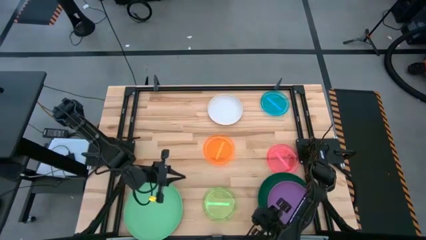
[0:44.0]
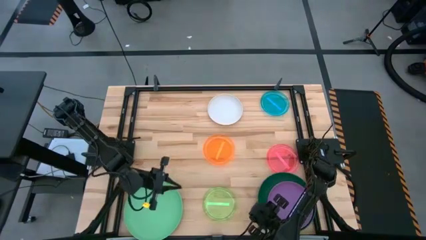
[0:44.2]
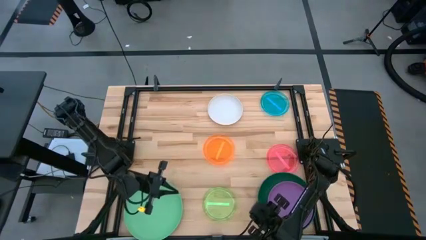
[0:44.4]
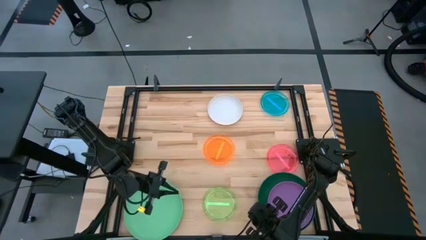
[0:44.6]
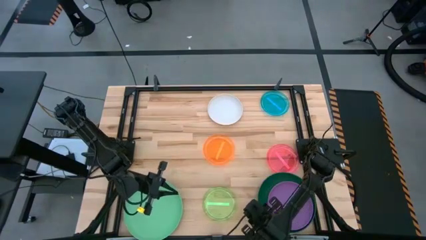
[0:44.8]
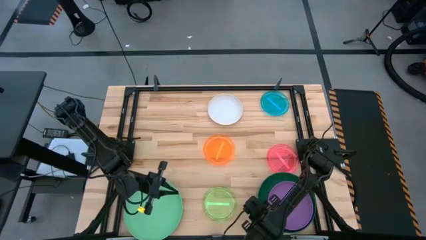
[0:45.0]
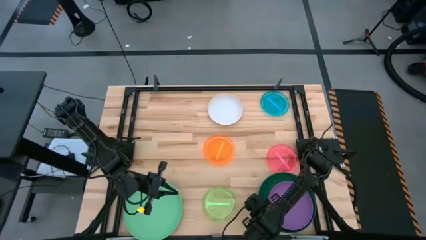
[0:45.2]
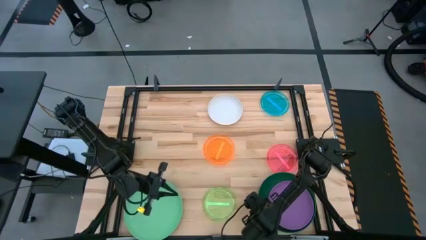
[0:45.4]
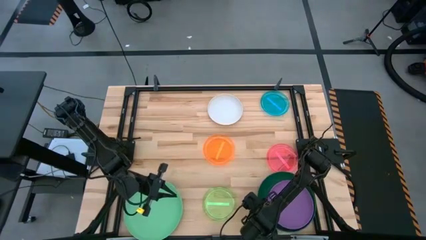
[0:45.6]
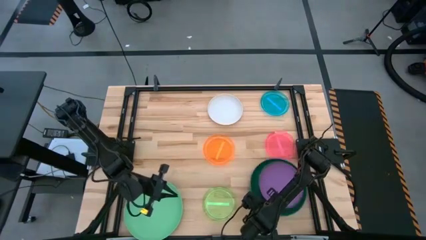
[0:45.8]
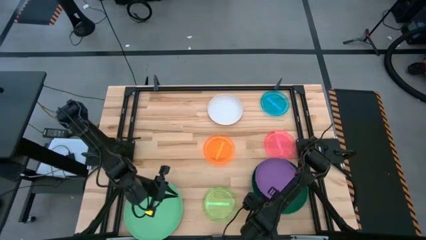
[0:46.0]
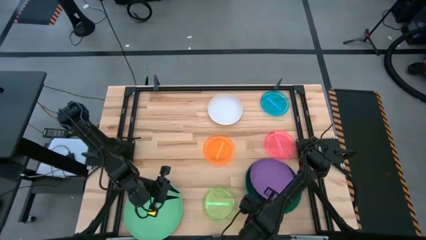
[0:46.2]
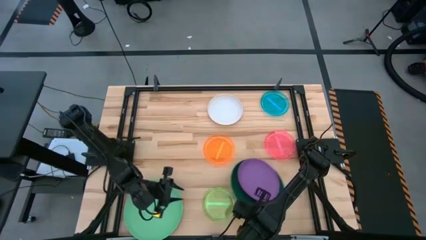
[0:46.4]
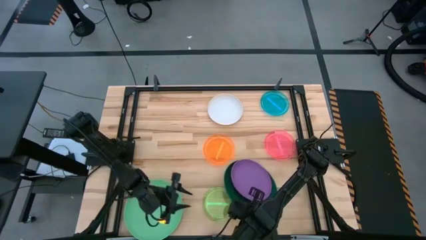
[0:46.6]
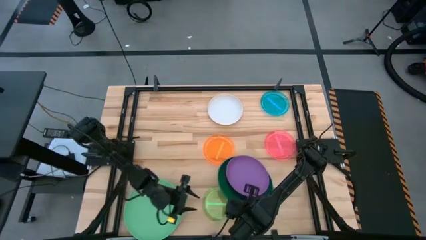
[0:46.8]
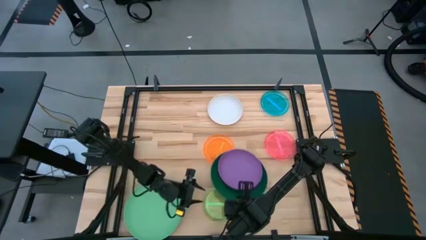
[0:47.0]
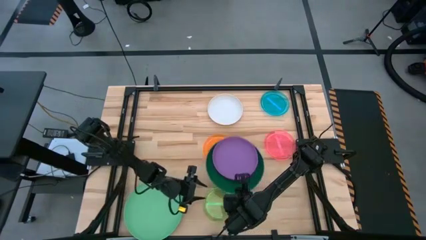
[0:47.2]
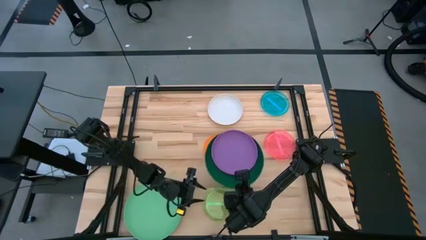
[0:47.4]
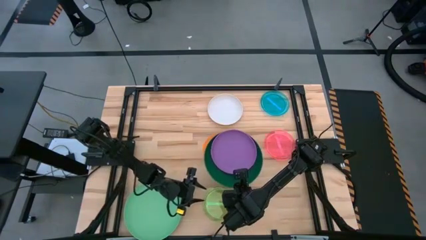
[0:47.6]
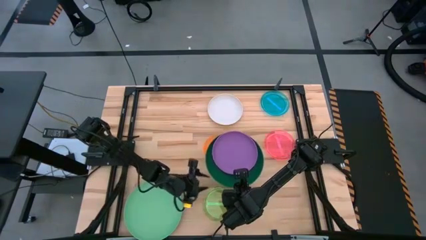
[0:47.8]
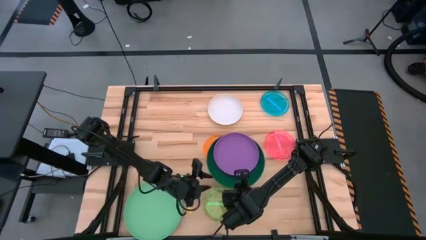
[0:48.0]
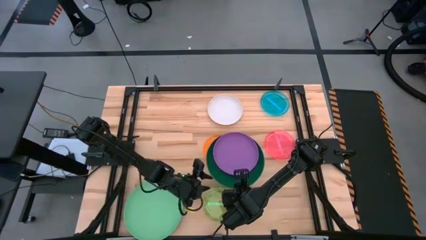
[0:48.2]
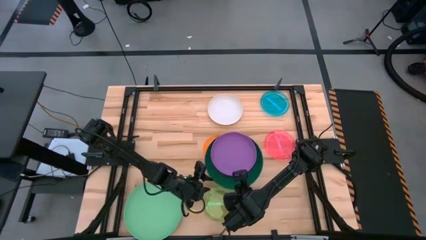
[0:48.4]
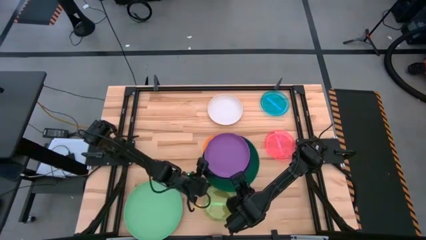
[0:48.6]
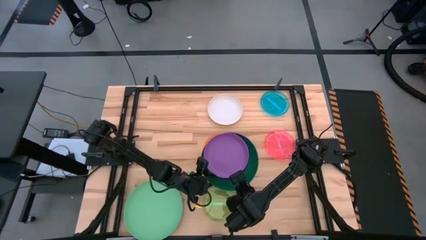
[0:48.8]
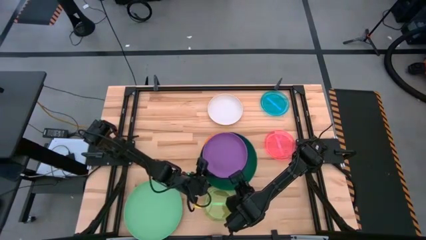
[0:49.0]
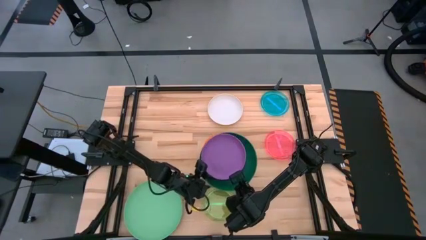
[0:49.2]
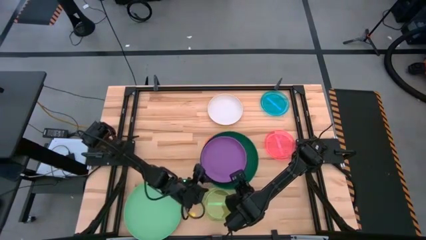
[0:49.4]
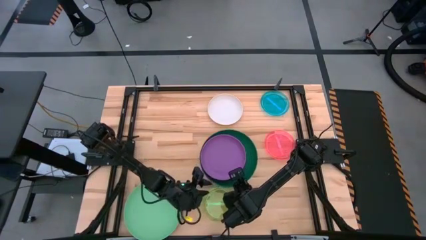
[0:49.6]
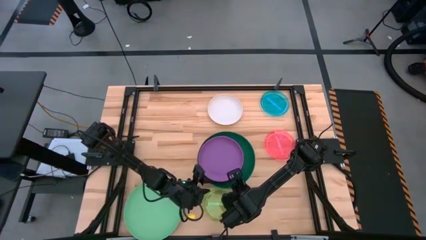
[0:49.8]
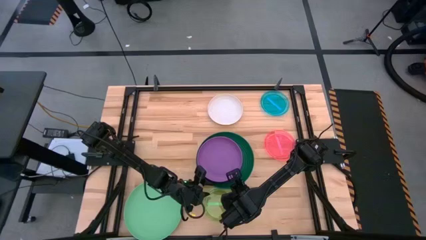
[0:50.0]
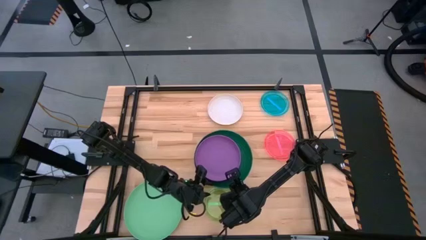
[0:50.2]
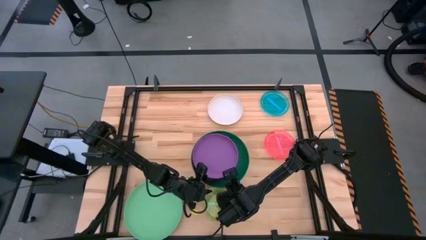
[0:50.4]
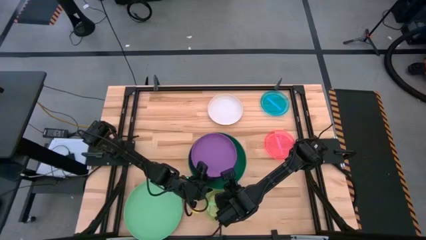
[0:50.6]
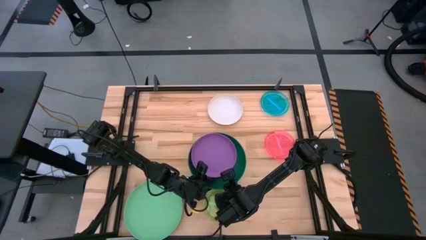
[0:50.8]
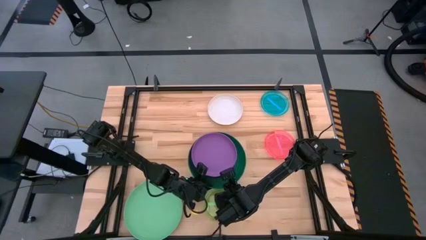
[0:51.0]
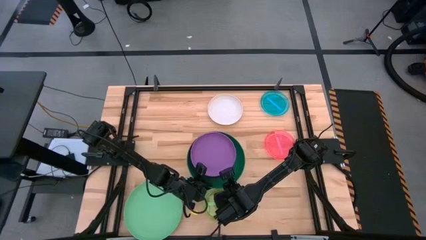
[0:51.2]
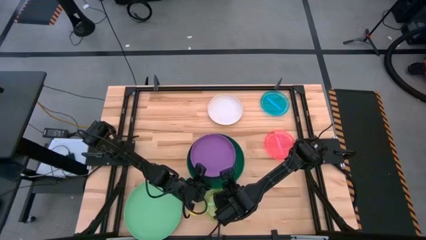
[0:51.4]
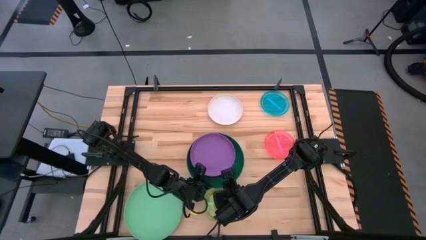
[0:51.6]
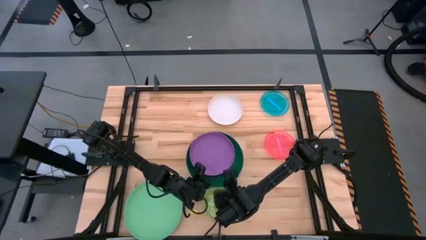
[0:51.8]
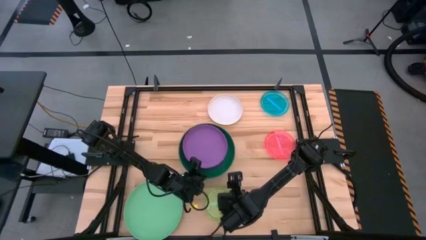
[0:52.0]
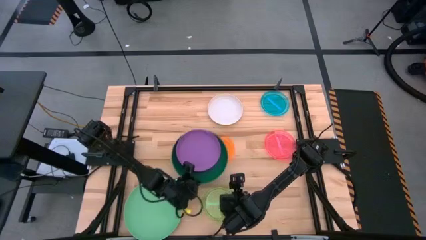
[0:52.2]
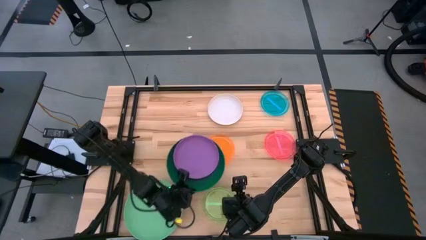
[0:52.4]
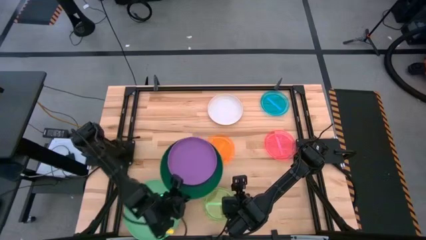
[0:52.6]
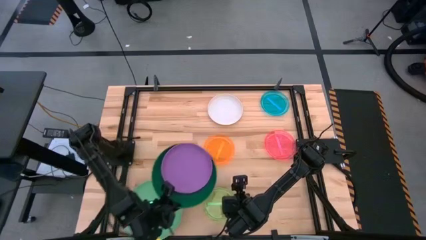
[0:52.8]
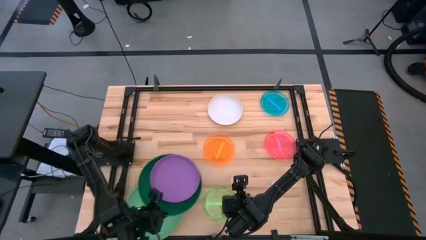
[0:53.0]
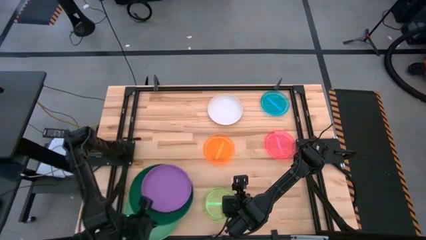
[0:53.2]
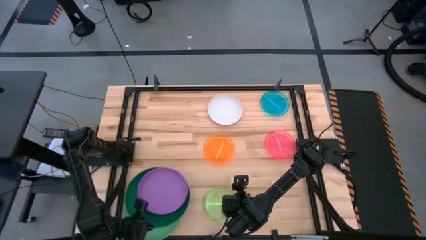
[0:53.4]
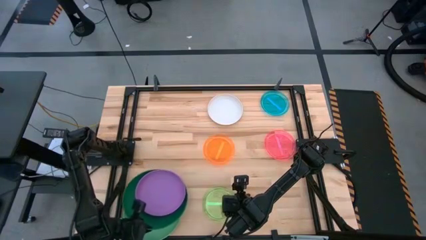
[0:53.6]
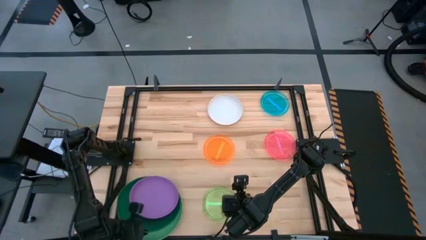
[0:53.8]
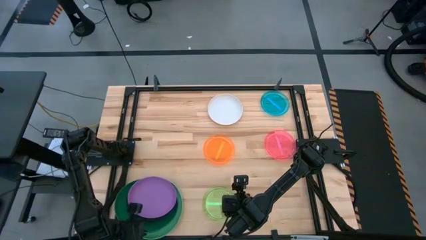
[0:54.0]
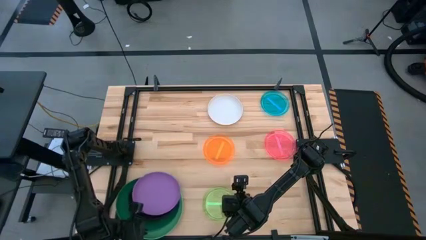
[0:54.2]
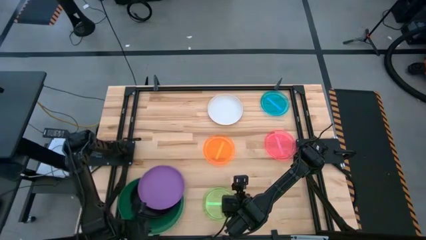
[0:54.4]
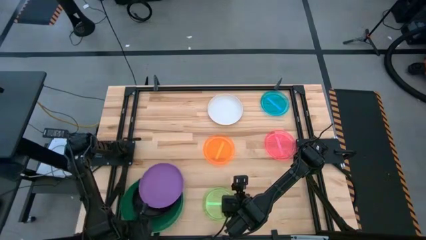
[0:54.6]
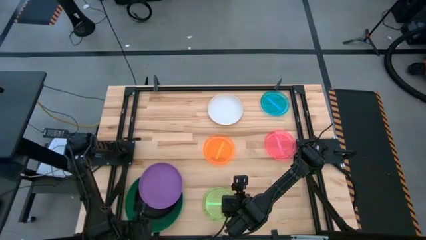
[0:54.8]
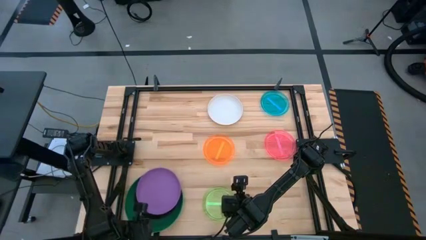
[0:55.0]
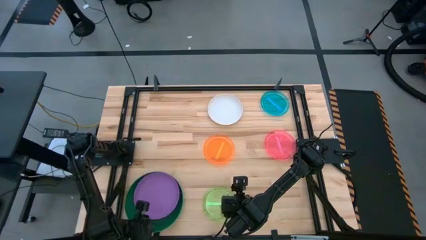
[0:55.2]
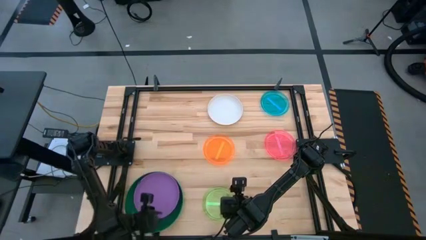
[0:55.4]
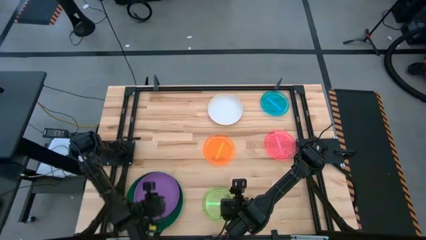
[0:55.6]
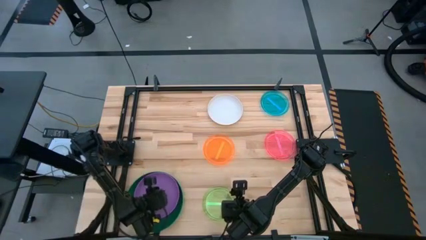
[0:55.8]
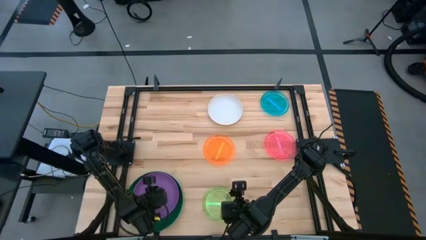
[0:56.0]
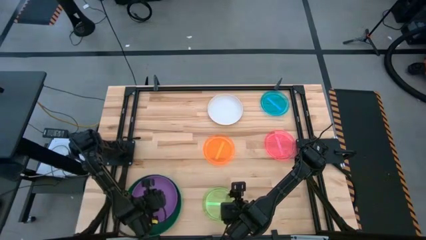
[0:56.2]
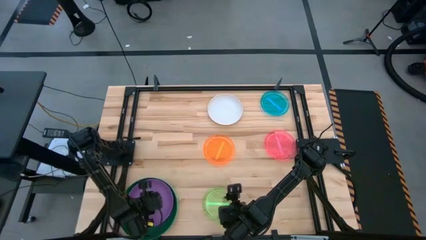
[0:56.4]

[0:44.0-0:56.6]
Task: Stack plastic plates
Stack the stacked plates on top of the green plate

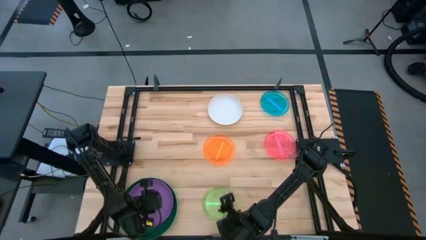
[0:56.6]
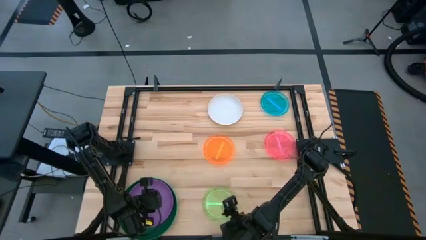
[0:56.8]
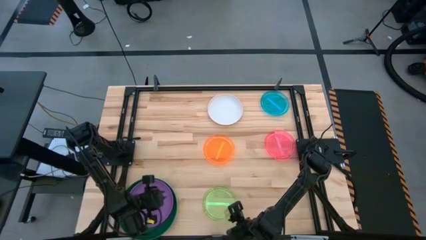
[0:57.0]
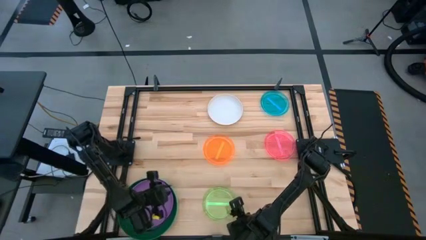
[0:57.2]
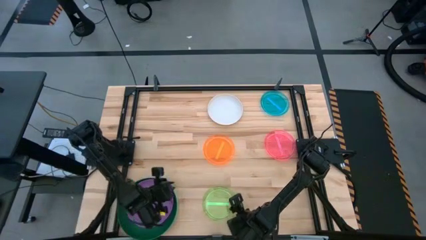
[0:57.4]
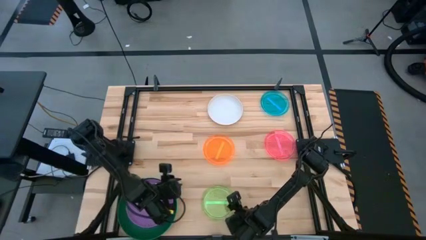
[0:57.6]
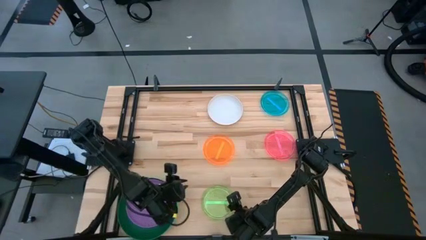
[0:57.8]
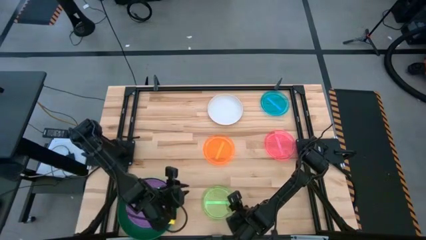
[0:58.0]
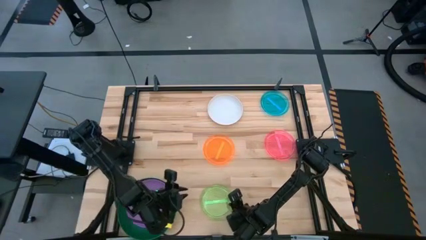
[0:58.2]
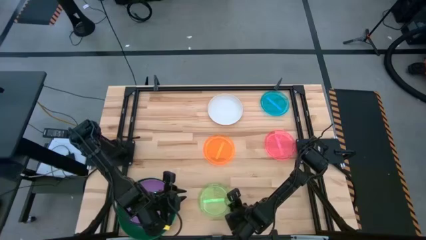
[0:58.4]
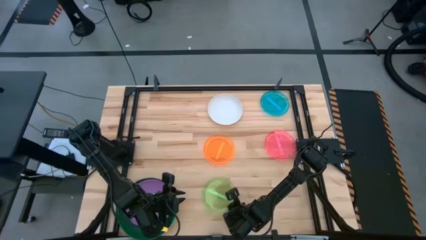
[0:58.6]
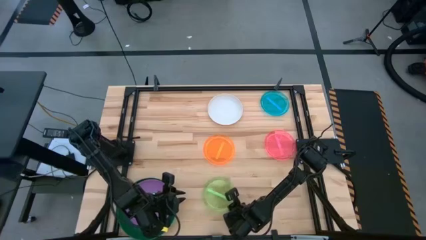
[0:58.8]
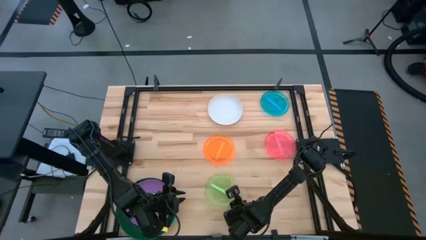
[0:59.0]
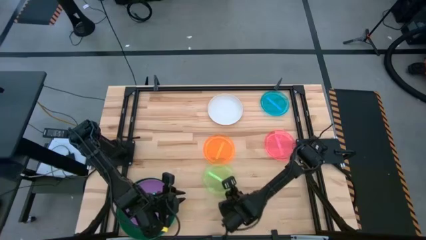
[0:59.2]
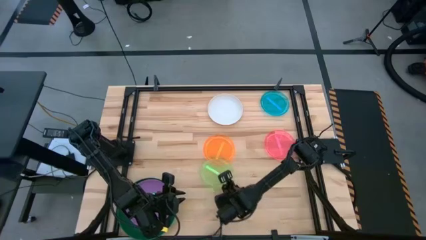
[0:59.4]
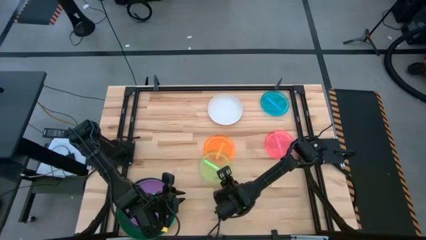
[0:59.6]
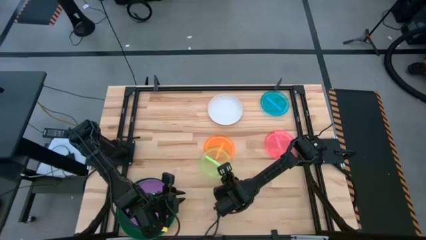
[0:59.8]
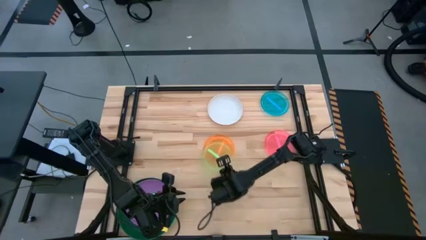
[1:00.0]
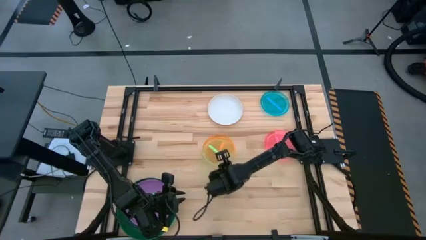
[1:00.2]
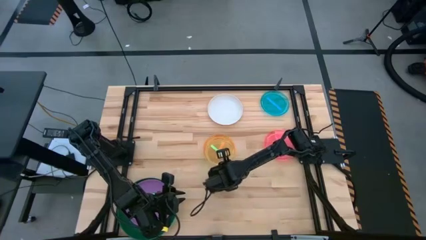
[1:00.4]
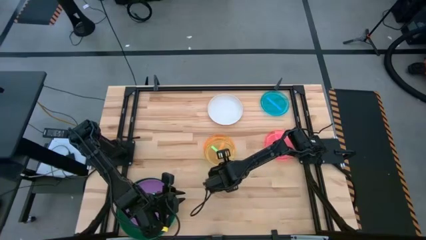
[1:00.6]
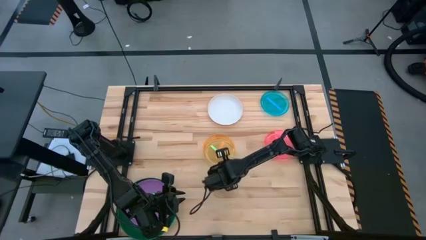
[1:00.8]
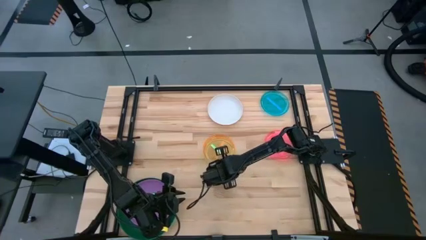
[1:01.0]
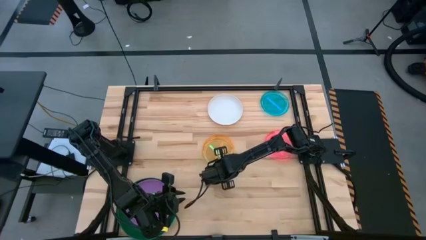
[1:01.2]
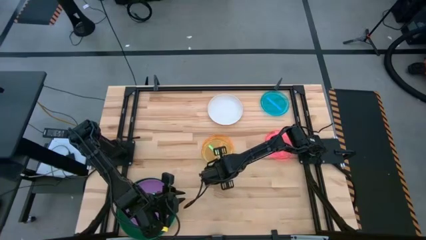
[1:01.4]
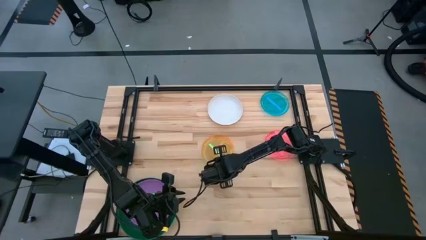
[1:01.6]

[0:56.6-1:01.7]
Stack the light green plate on top of the orange plate
